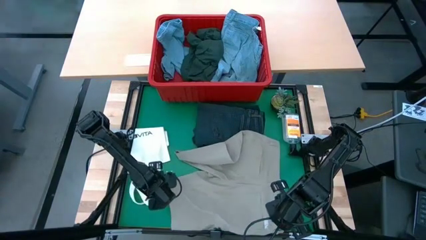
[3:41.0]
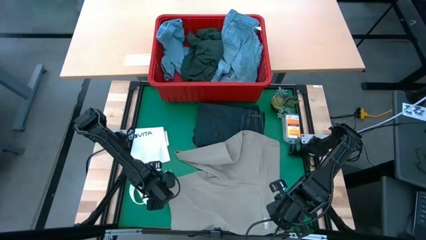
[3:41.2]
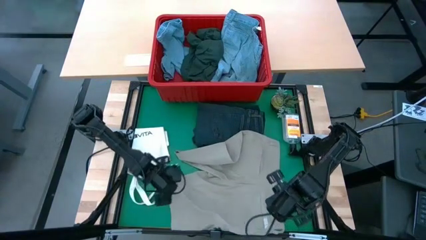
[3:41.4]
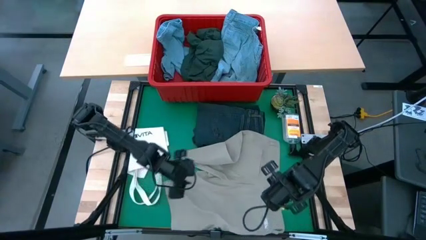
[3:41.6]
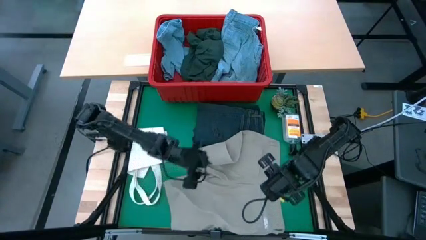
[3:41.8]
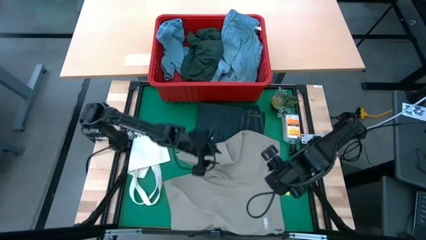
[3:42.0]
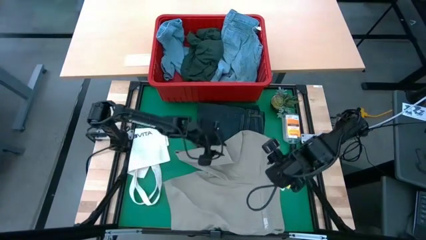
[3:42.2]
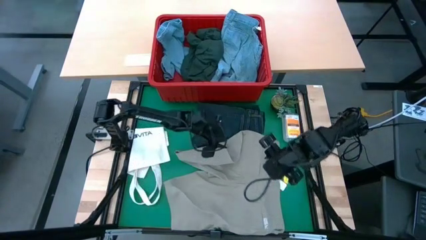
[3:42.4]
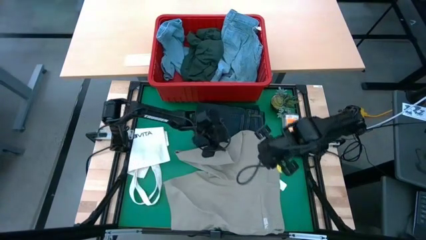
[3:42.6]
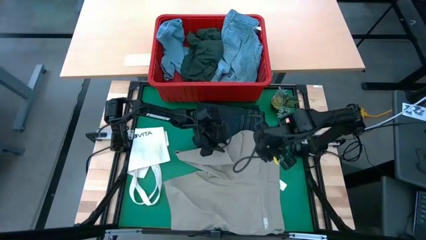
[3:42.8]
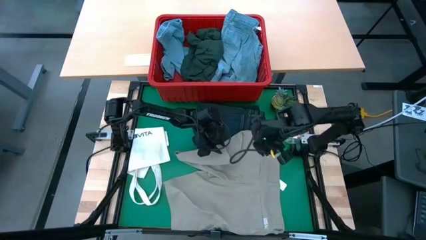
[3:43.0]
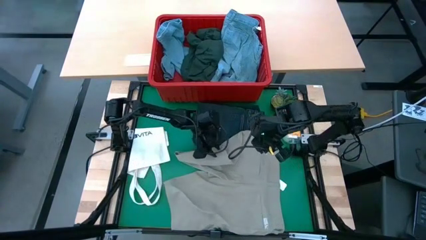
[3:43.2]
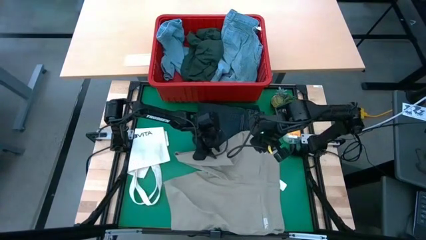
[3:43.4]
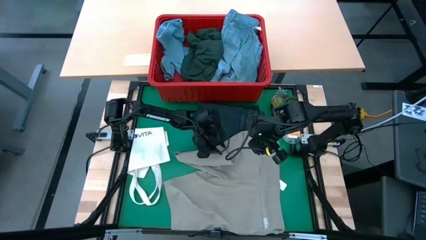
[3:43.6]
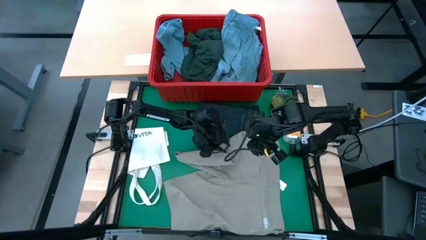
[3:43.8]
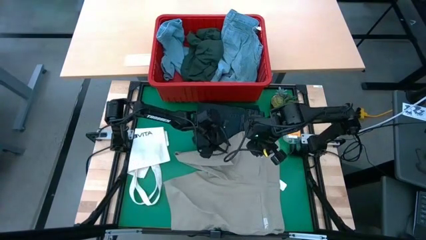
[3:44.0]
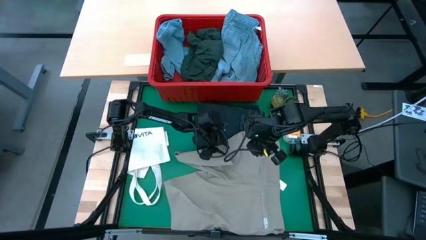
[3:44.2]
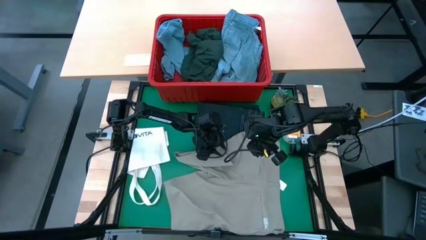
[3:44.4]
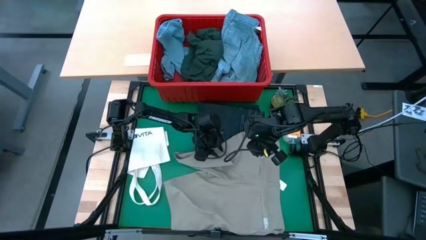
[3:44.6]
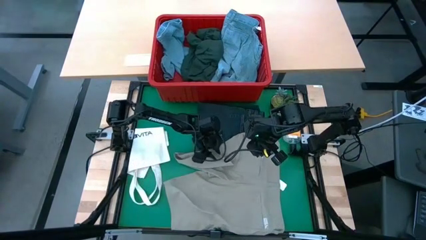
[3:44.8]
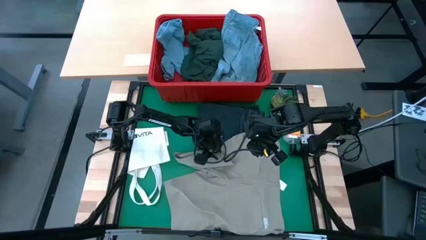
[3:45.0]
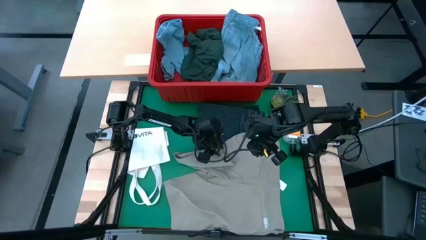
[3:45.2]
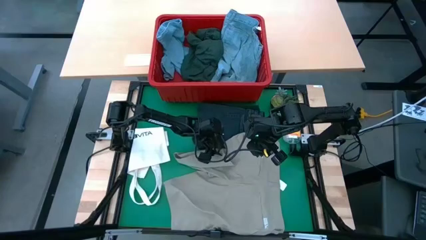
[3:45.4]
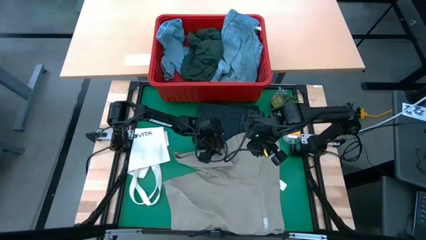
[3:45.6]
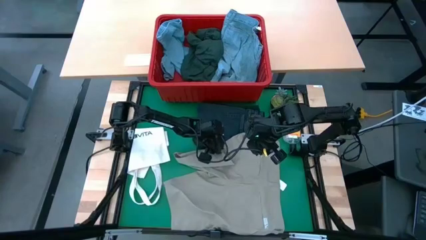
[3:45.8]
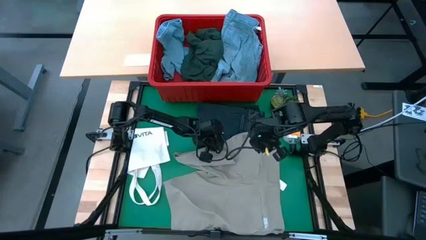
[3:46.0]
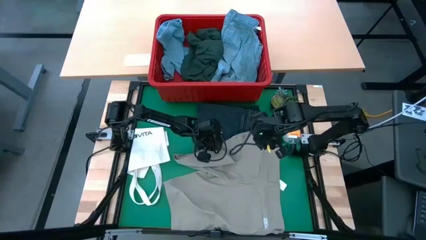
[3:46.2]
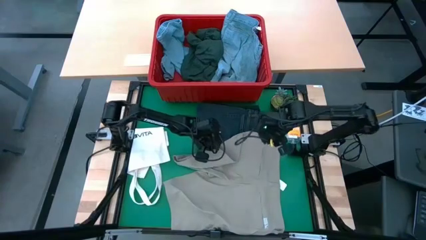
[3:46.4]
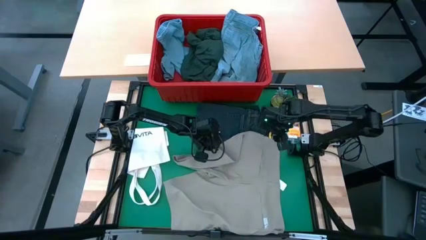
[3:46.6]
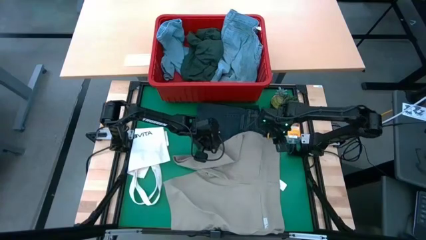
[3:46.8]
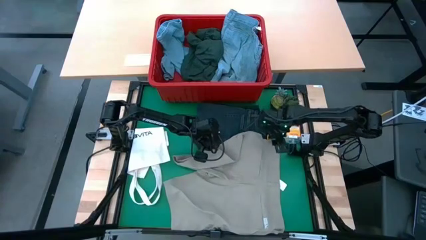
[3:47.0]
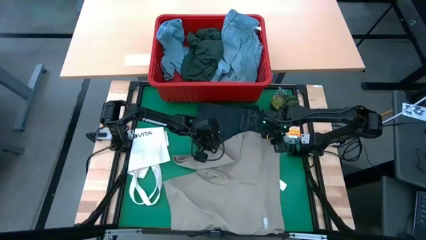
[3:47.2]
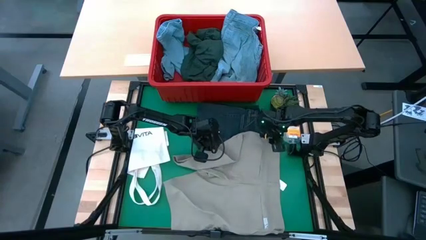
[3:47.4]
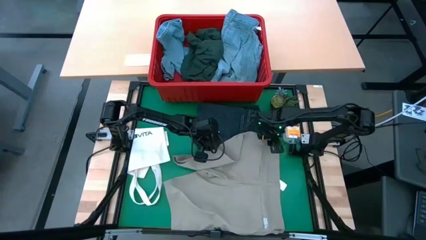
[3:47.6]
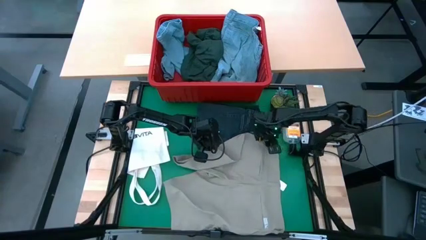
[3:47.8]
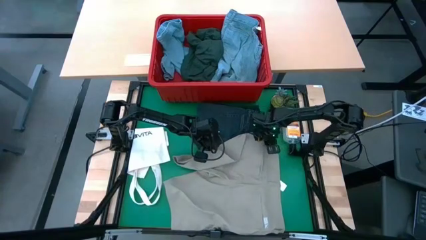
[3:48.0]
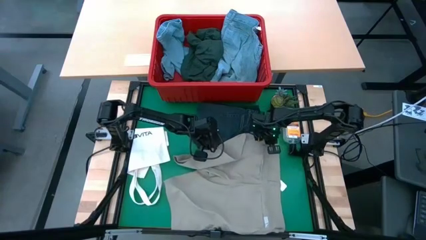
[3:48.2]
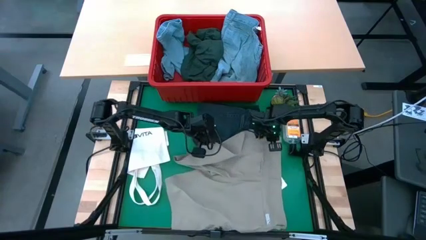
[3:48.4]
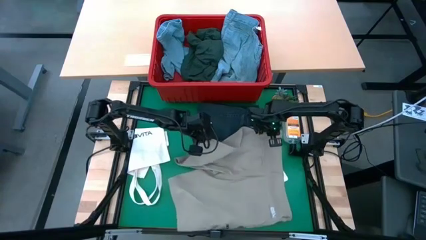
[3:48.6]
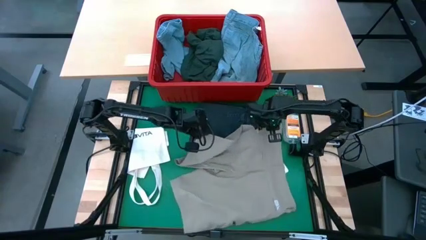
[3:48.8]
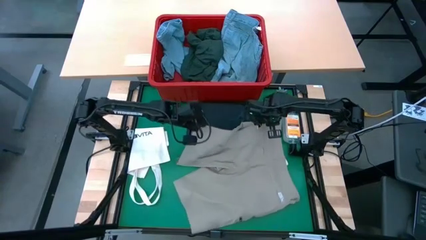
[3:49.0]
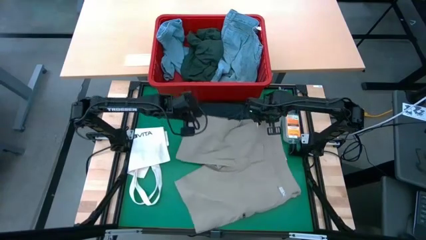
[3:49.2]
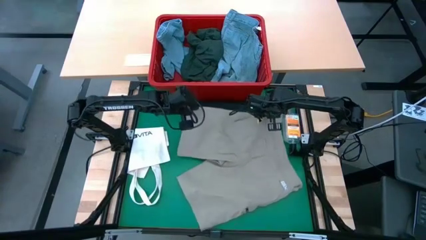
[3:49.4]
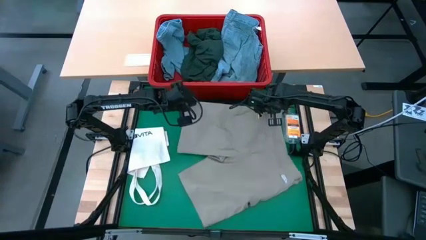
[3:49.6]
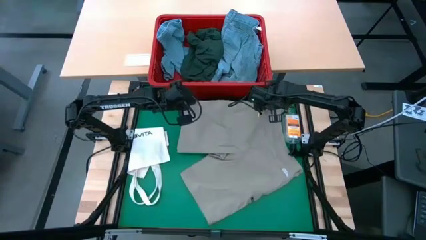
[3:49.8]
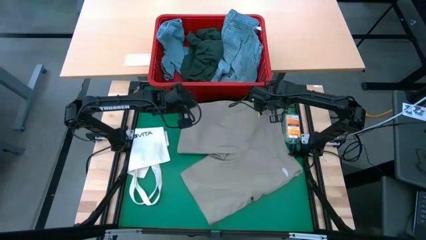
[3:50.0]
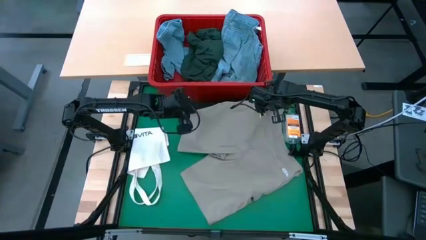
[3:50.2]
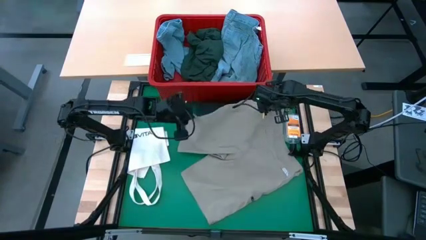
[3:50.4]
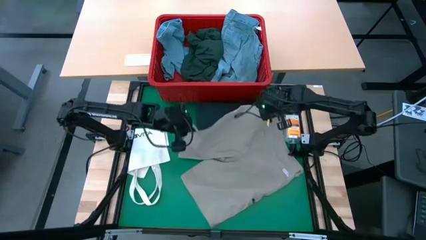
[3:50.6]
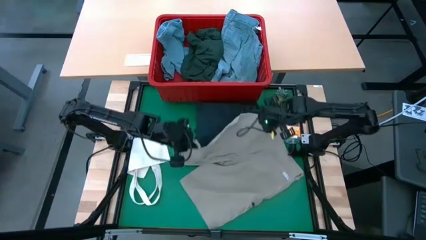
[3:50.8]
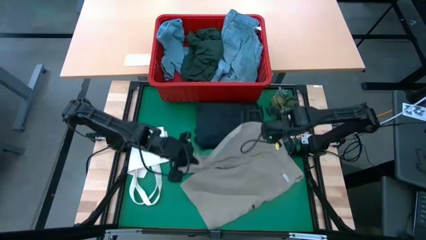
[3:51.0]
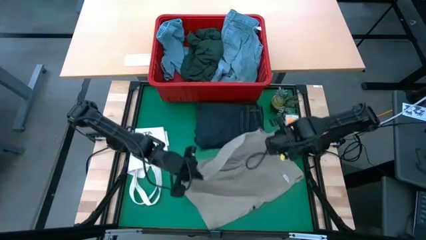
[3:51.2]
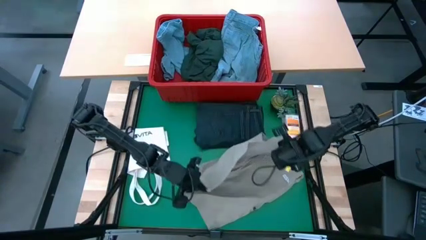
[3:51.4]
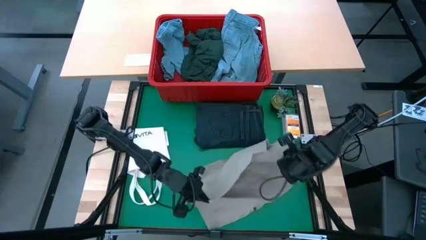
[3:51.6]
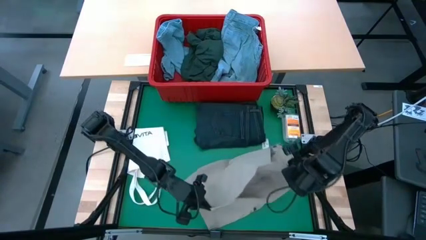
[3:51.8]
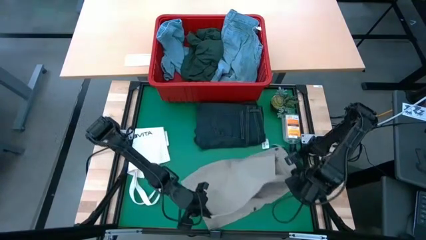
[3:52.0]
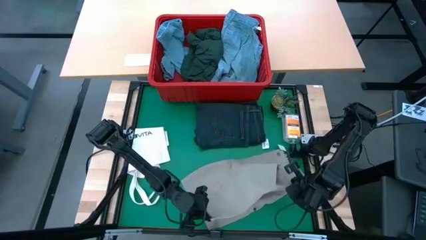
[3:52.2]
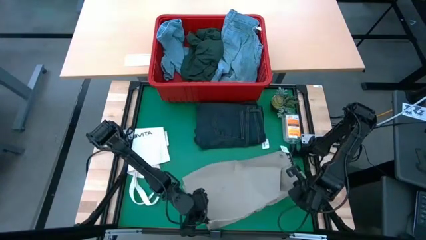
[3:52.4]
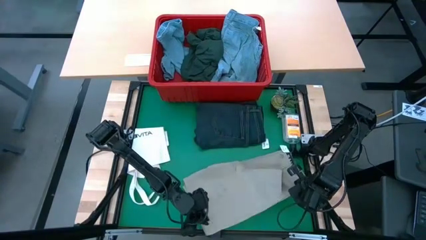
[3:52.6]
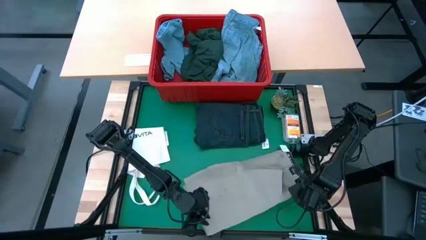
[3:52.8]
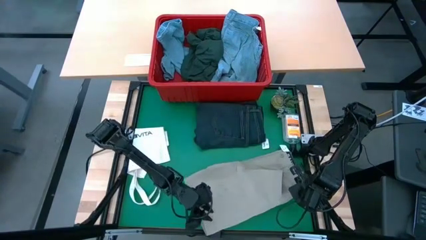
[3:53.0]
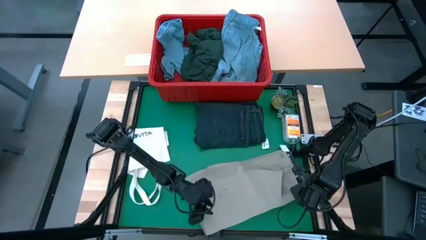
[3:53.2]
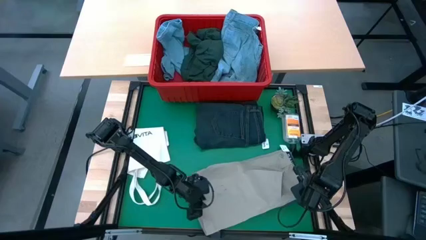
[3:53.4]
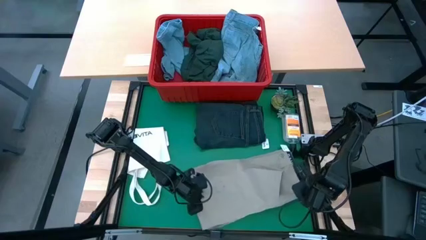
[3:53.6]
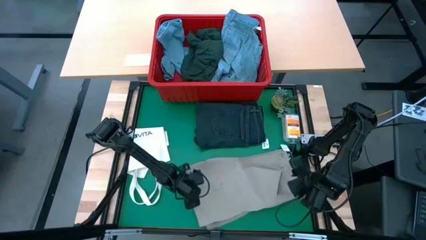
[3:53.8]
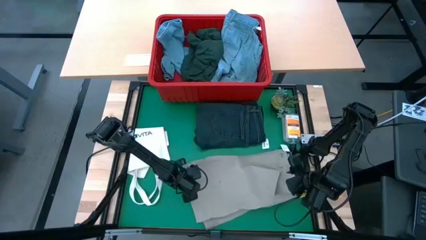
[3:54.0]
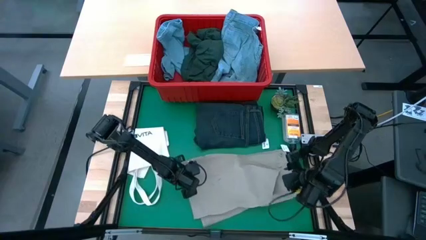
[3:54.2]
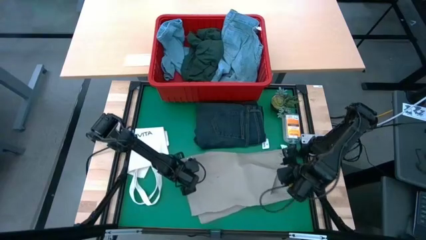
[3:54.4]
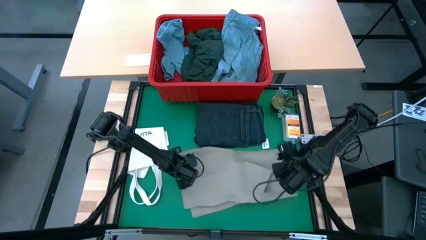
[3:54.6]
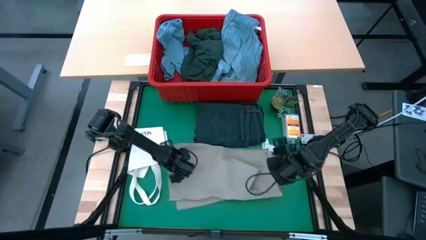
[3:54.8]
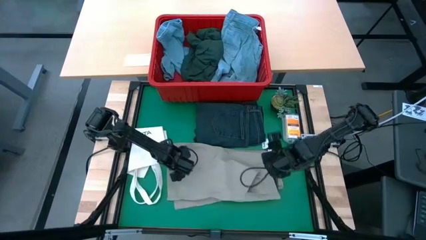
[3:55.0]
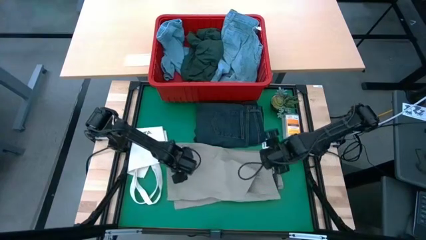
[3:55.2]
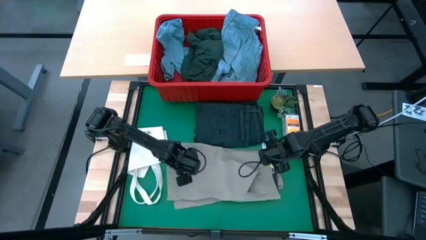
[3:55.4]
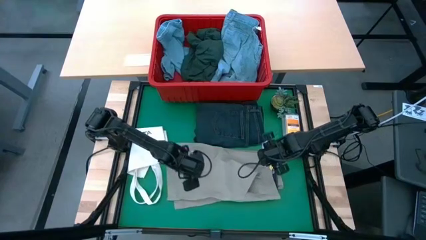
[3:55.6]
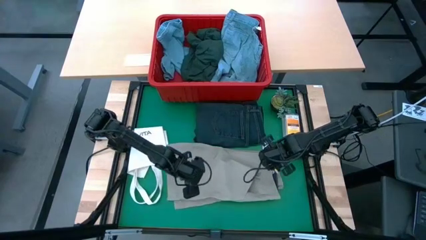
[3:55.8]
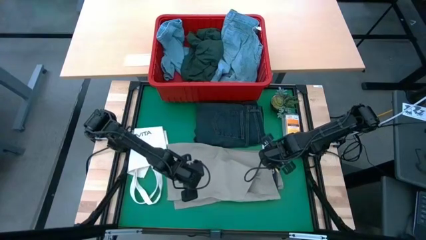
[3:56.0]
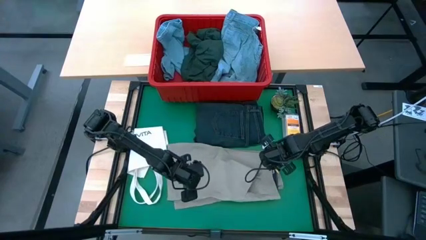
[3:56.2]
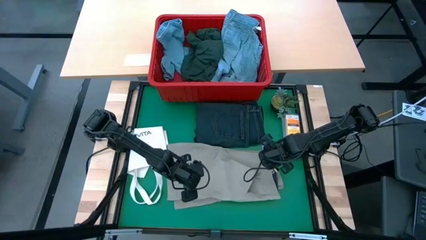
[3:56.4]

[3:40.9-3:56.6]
Task: Fold laundry
Fold the brown shorts

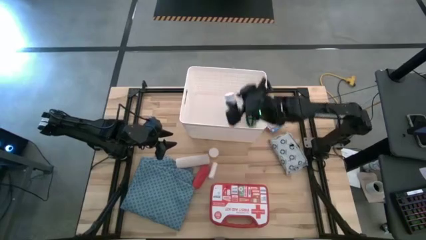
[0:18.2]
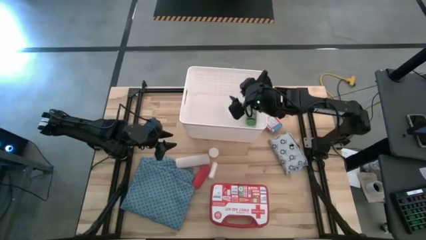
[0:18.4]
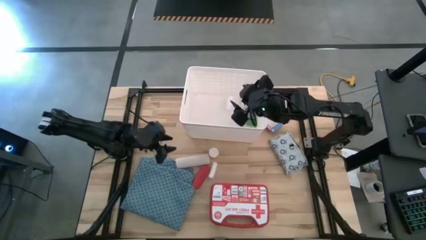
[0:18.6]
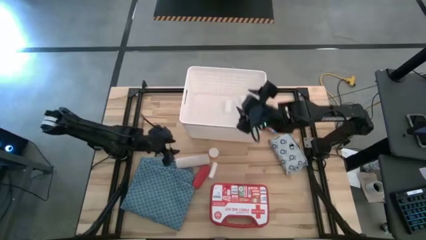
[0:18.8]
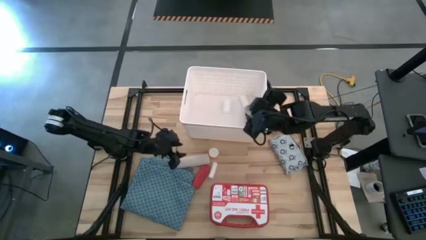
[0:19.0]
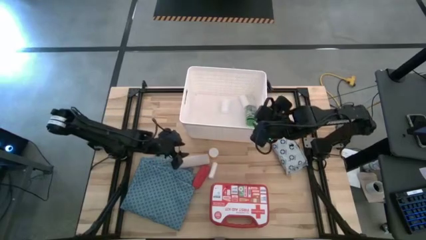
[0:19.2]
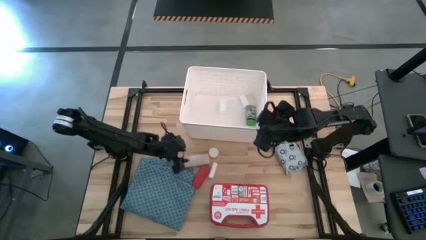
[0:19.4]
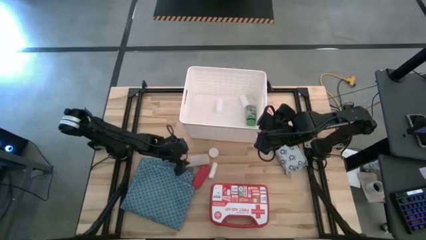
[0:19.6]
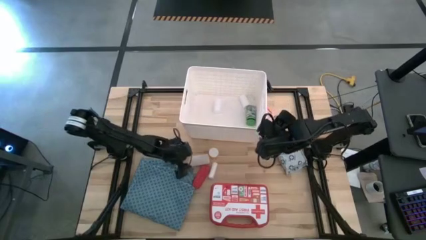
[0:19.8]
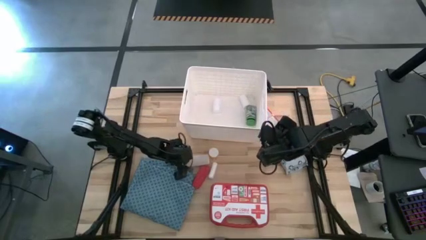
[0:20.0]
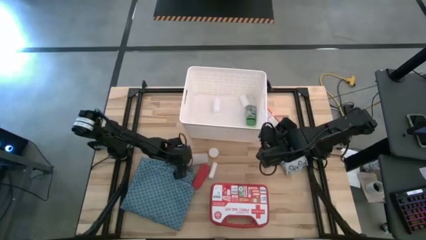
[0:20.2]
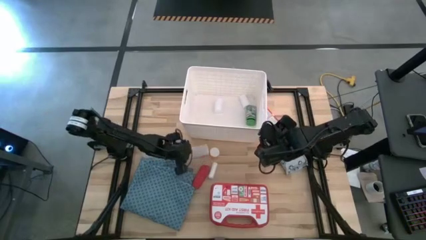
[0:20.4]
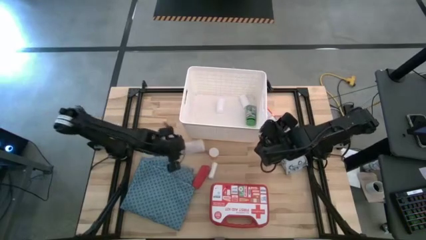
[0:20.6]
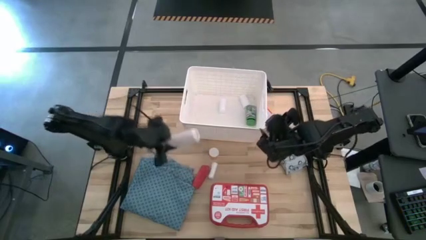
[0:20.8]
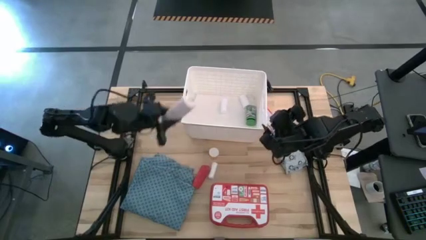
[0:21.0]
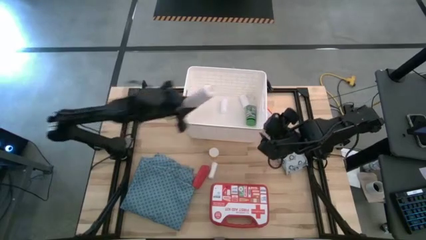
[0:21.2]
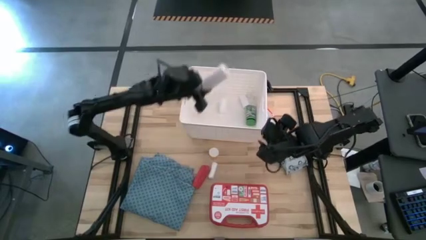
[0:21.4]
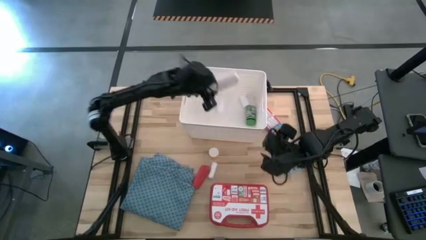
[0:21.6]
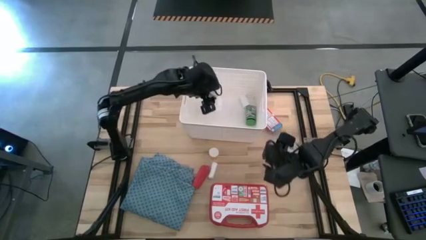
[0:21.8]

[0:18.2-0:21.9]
Task: Pick & place medical supplies in basket/bin
Put the light brown bandage into the white bin
